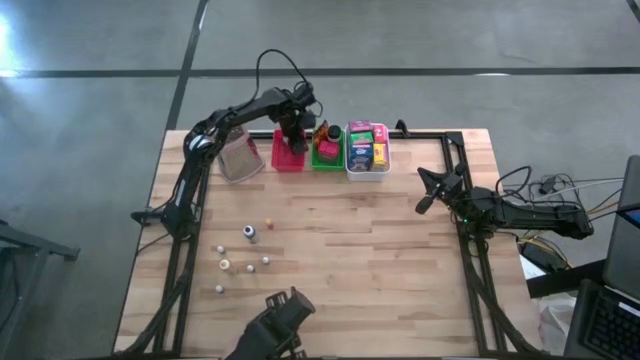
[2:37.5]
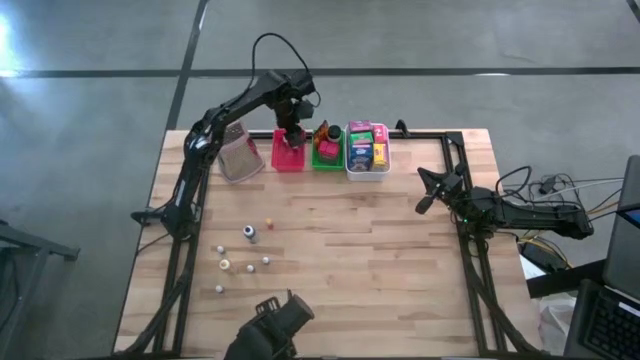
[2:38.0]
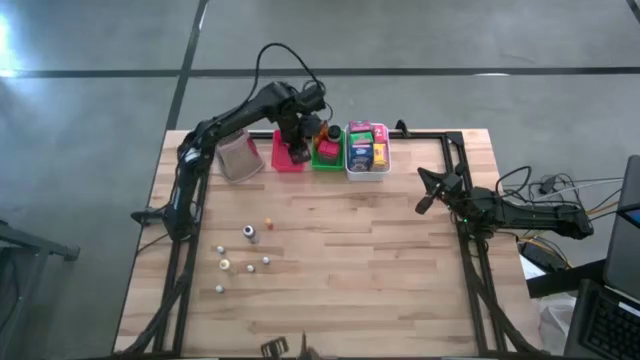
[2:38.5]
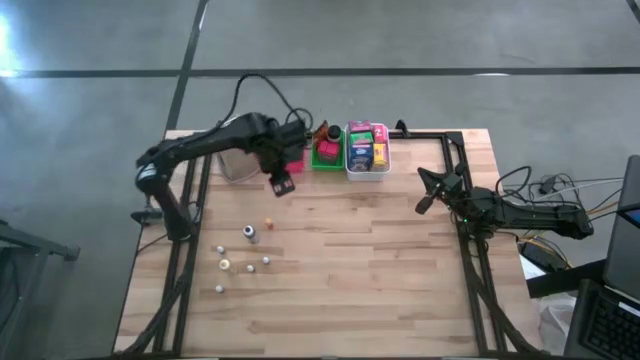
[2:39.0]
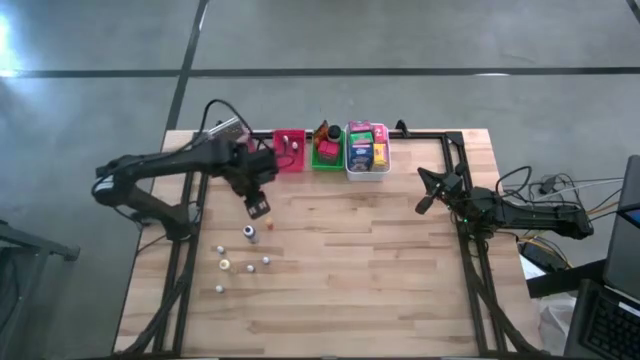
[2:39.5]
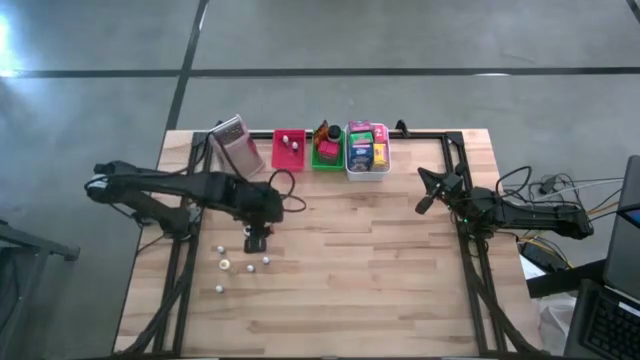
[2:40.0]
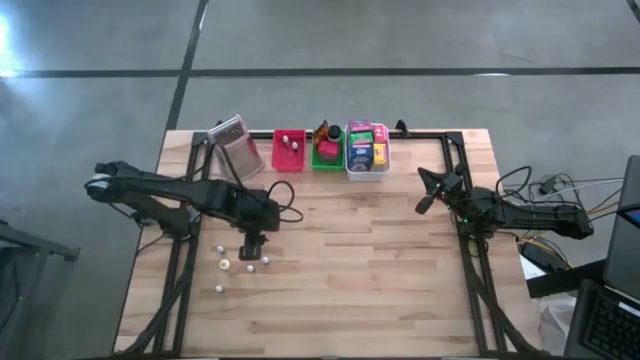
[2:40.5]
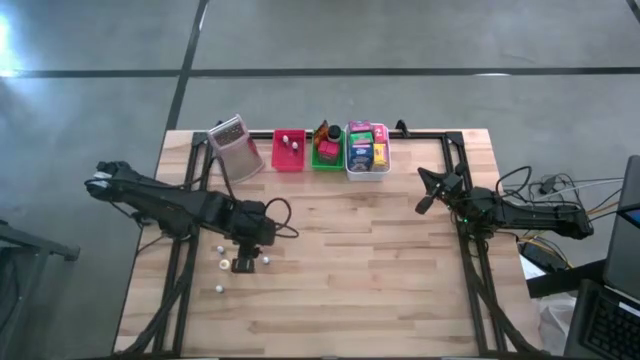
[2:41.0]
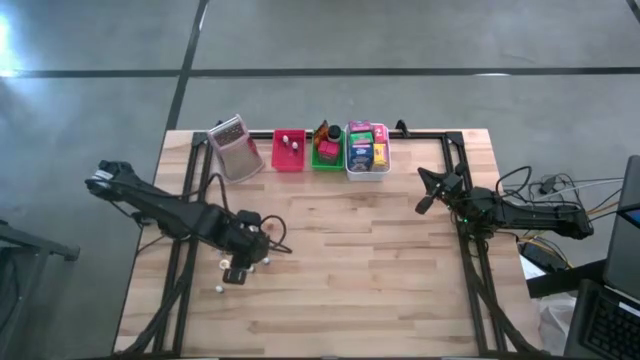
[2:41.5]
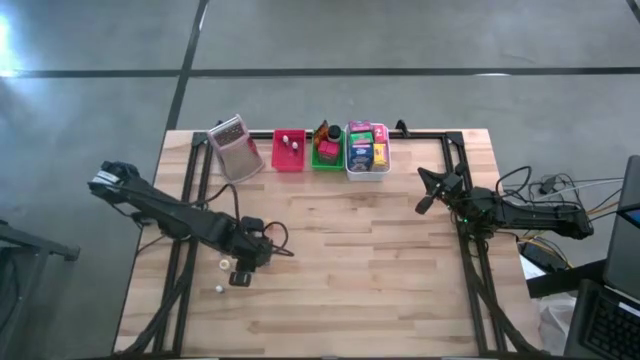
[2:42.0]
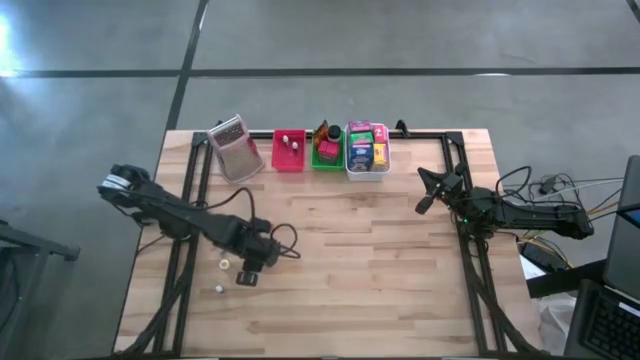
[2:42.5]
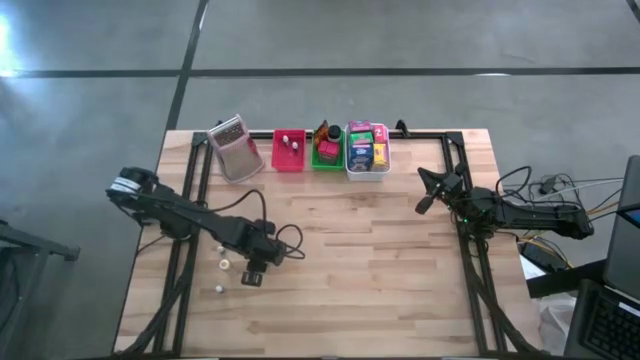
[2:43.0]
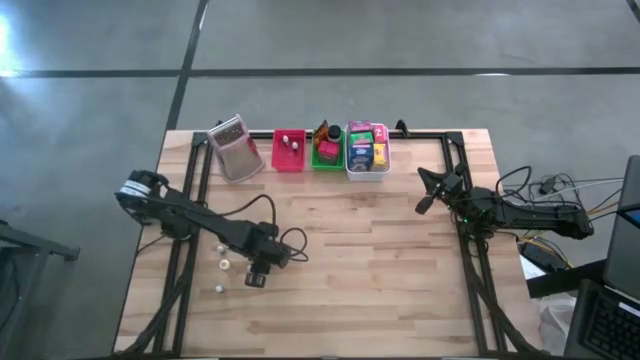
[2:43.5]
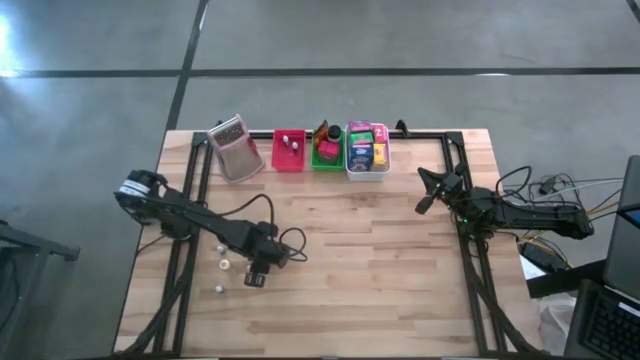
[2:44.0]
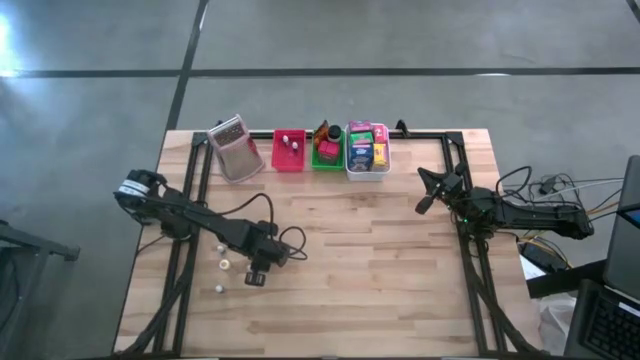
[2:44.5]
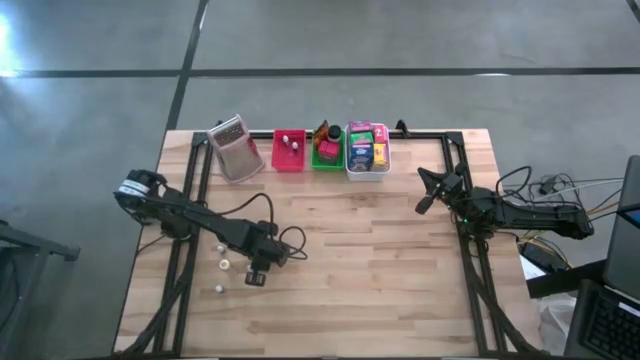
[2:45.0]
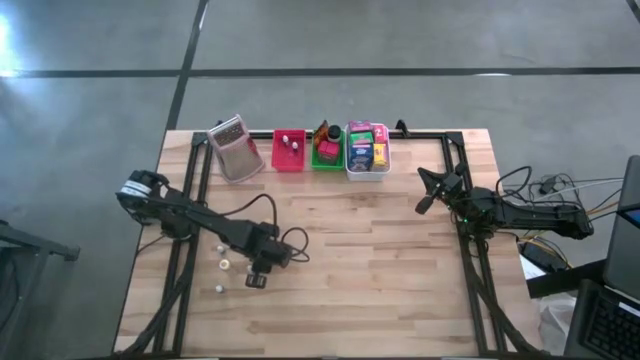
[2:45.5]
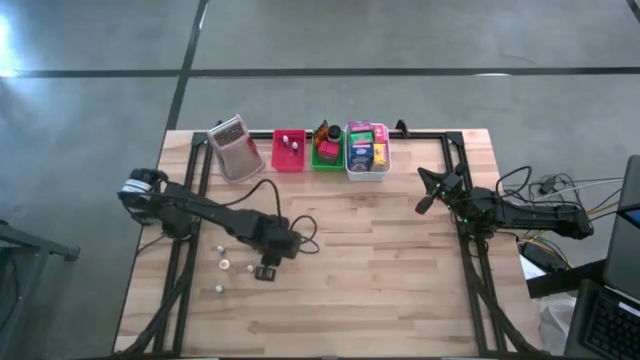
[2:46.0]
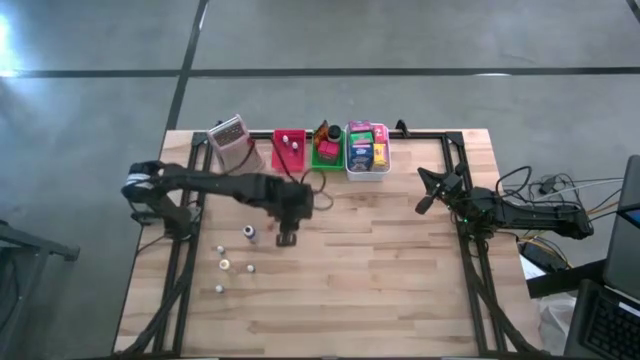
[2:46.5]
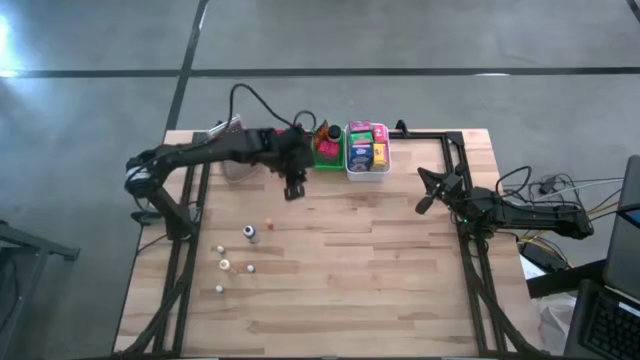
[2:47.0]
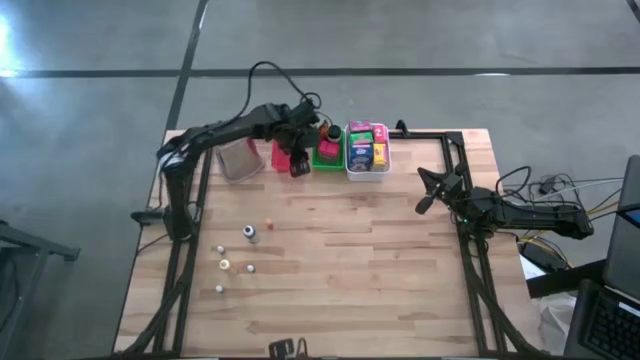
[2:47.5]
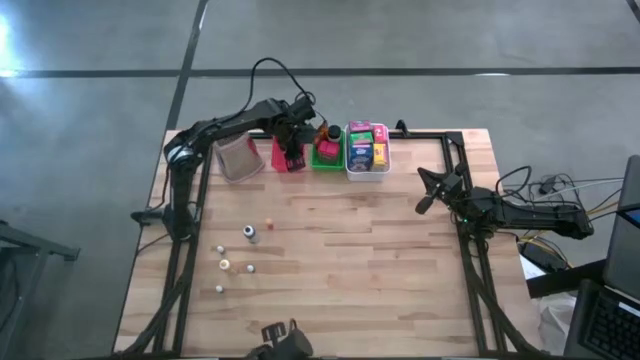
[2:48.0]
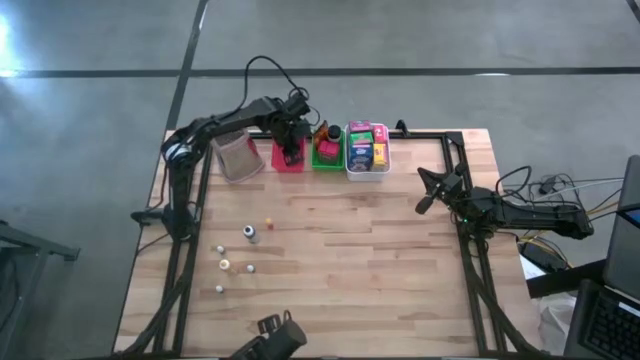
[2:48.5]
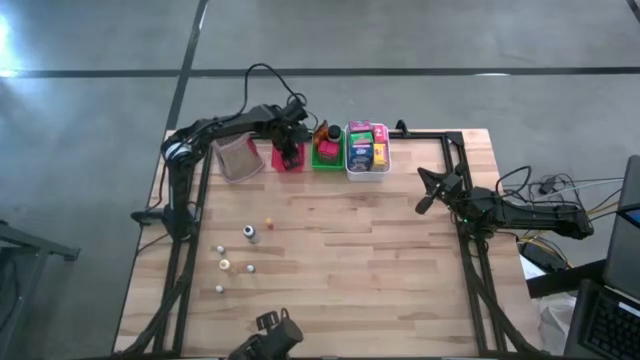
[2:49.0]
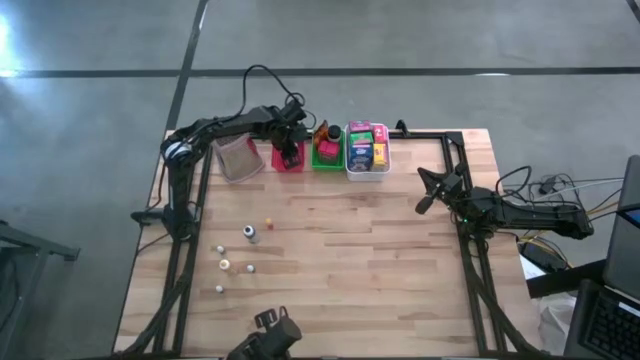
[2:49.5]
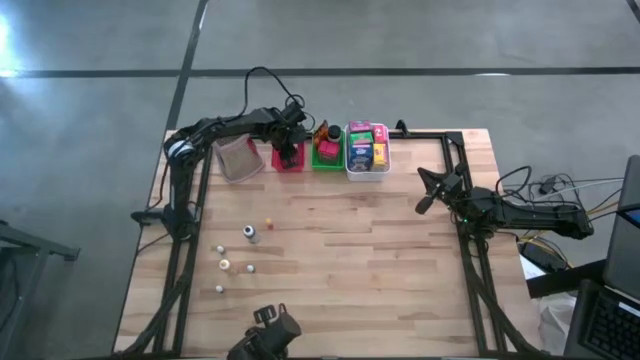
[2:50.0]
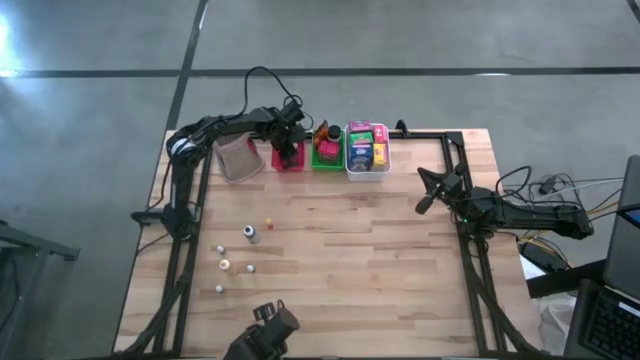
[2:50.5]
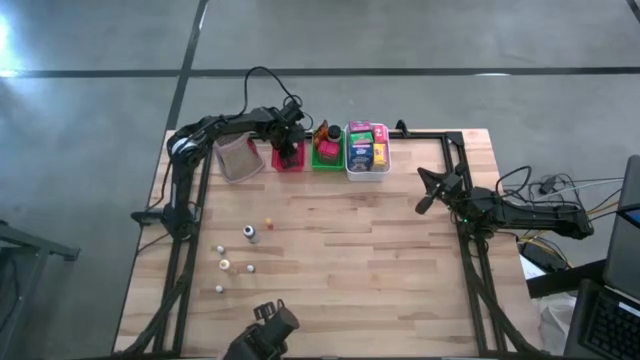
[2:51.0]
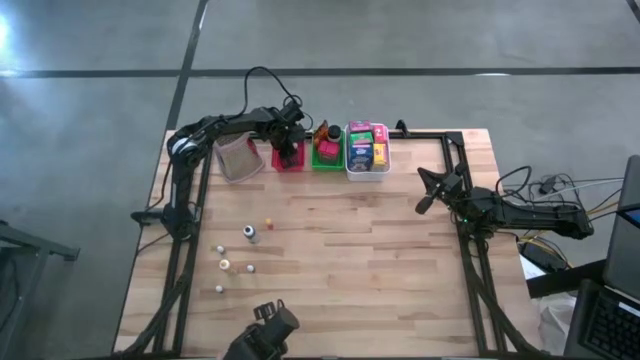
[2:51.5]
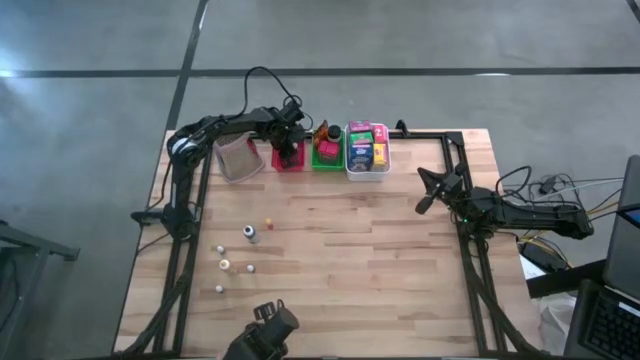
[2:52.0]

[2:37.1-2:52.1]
Task: Pick & Place Kitchen Items
Put the small black food coloring bottle into the red bin

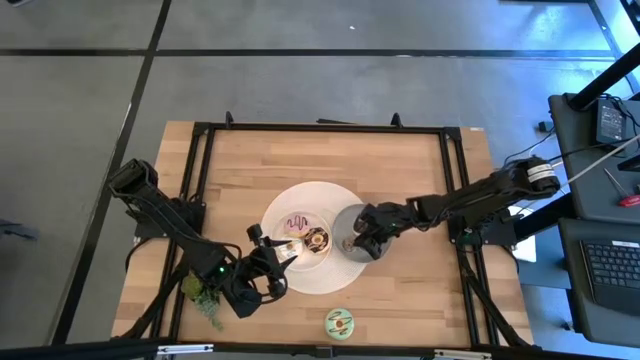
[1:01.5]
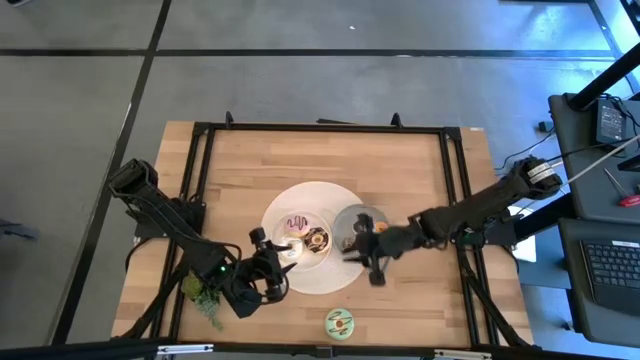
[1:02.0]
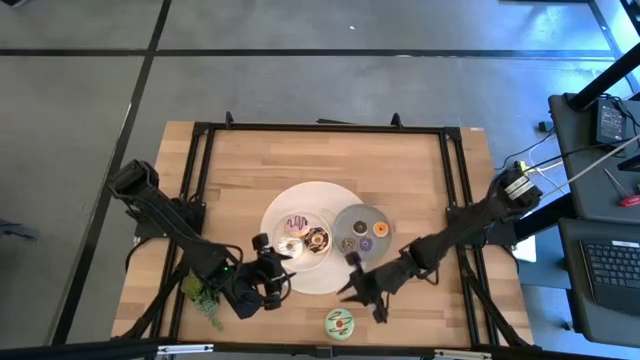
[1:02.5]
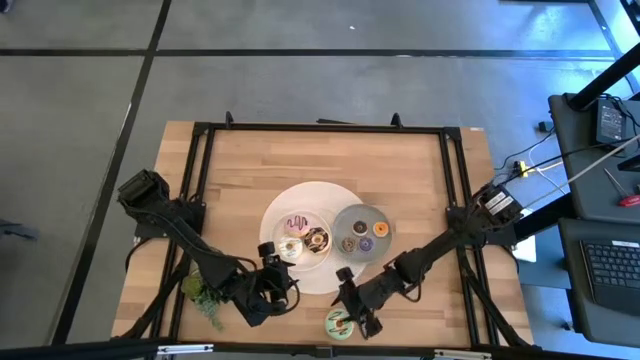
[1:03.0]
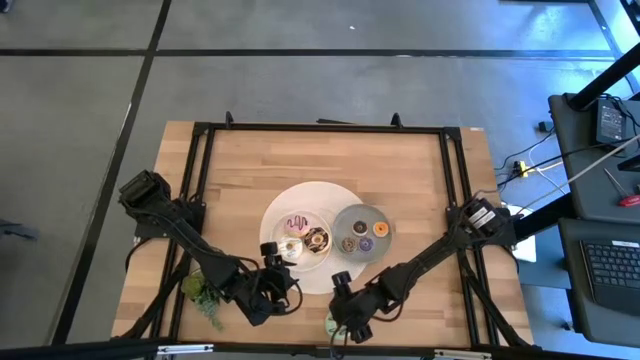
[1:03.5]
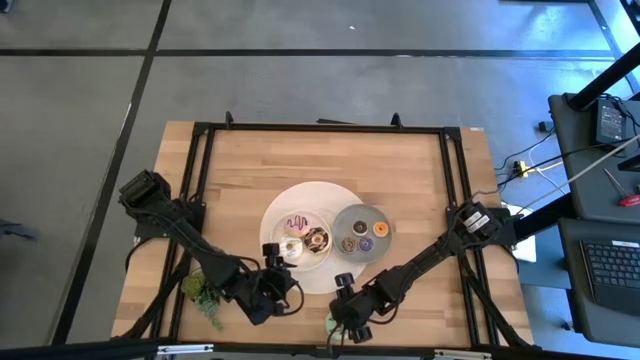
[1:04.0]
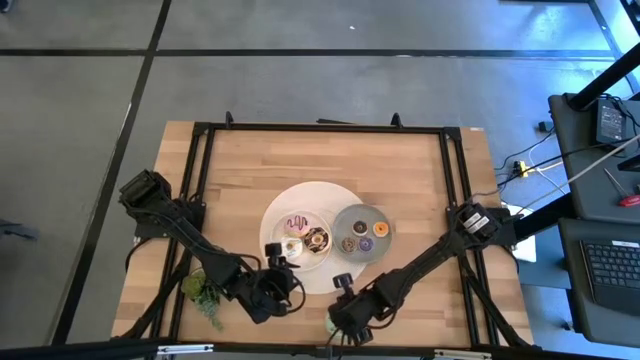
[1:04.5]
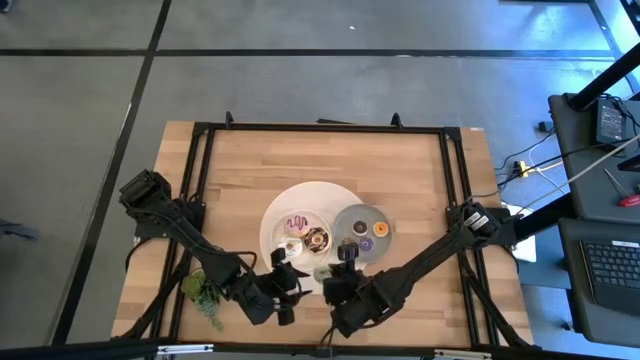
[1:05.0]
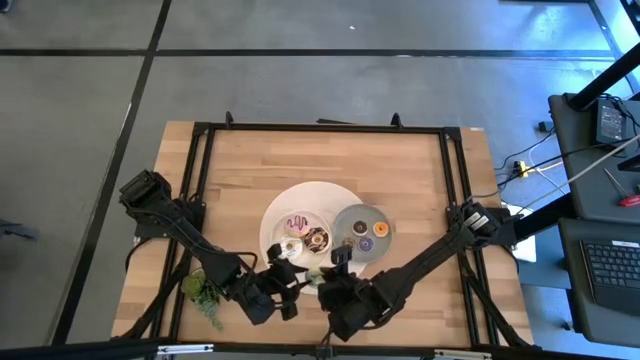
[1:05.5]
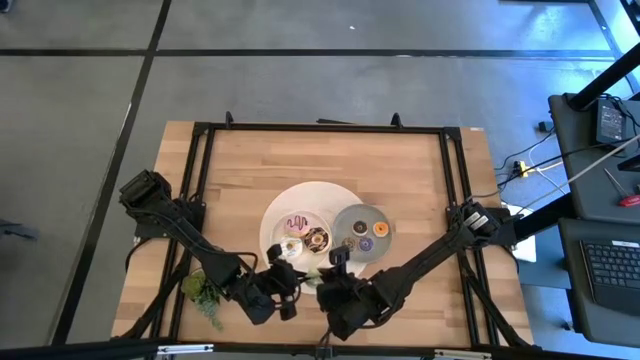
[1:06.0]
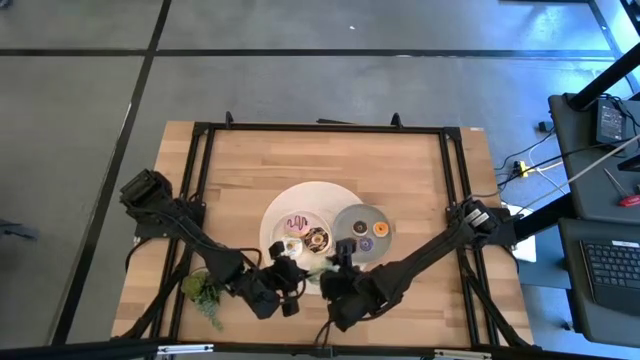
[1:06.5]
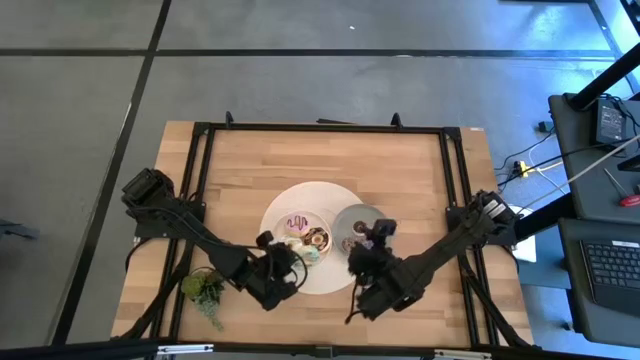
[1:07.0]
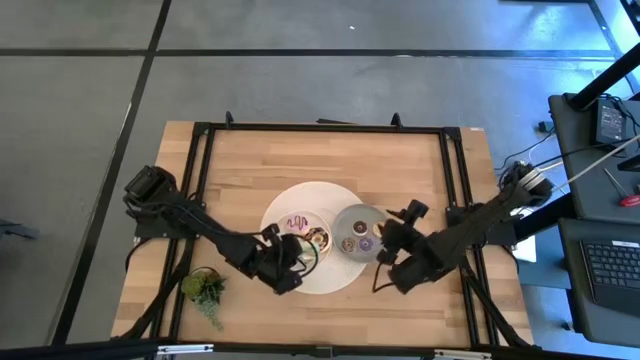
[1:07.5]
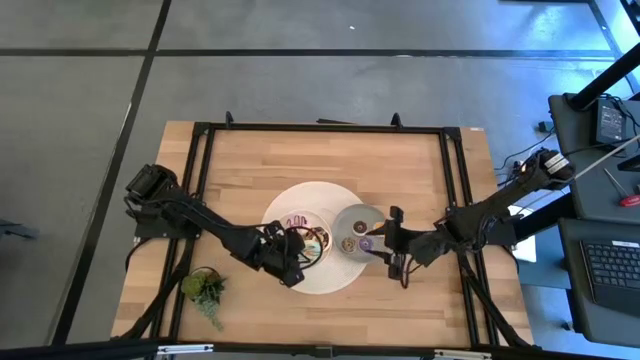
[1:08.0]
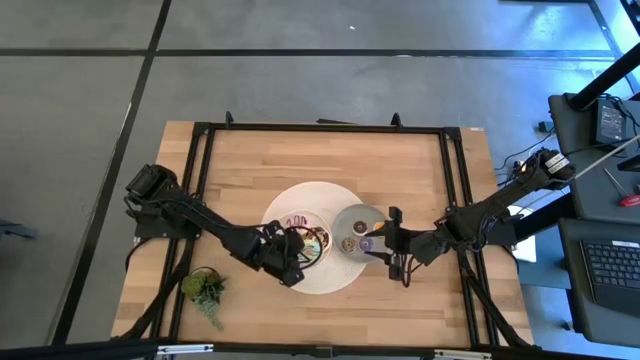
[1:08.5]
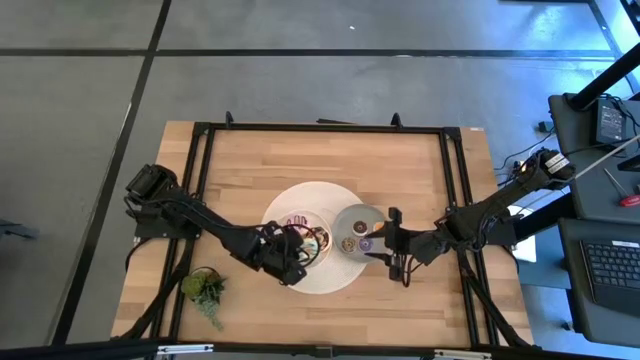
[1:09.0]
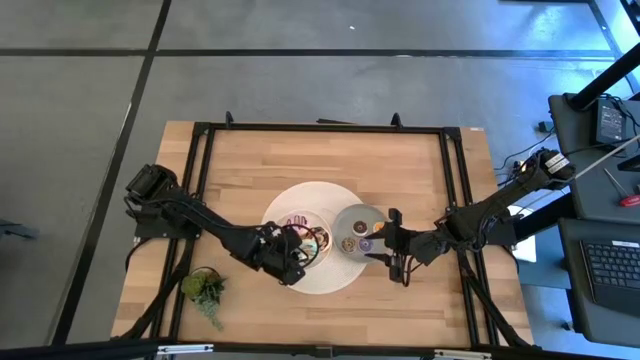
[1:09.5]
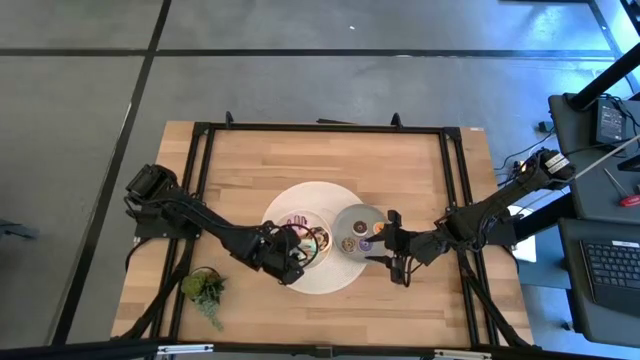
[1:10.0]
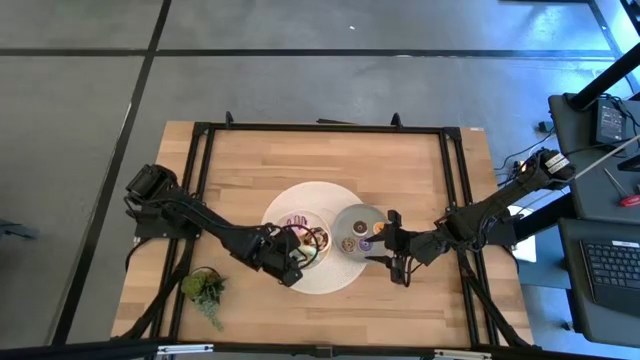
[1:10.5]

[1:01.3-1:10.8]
Task: Pick & Place donuts
Put the big green donut on the white plate
